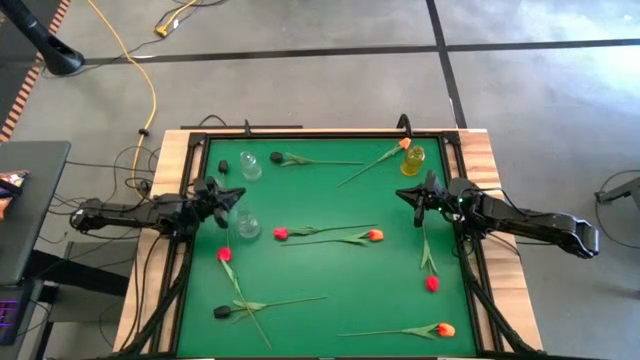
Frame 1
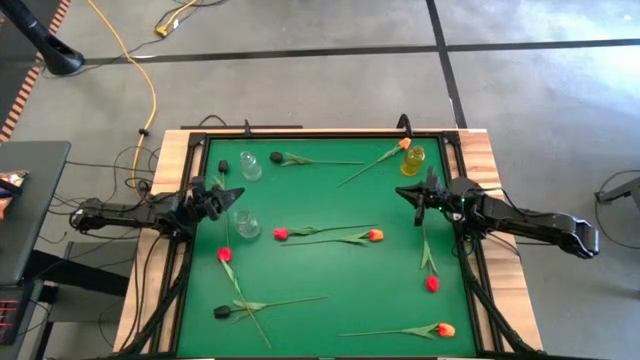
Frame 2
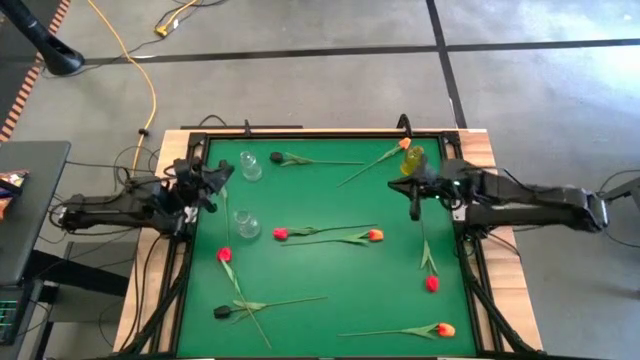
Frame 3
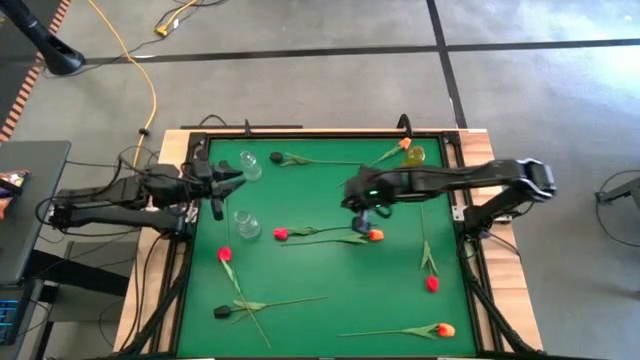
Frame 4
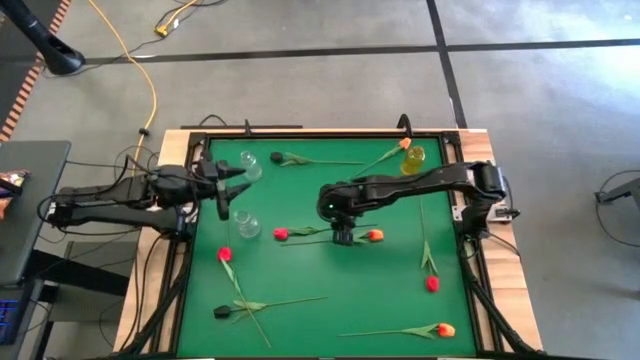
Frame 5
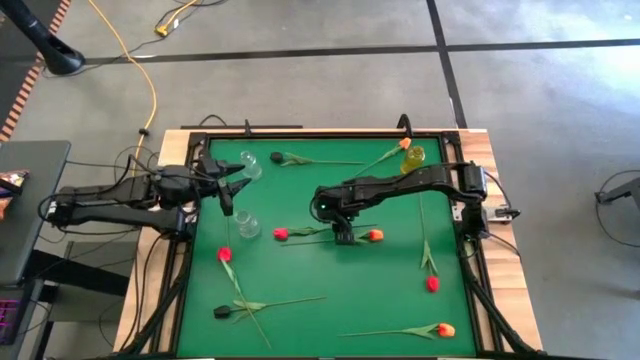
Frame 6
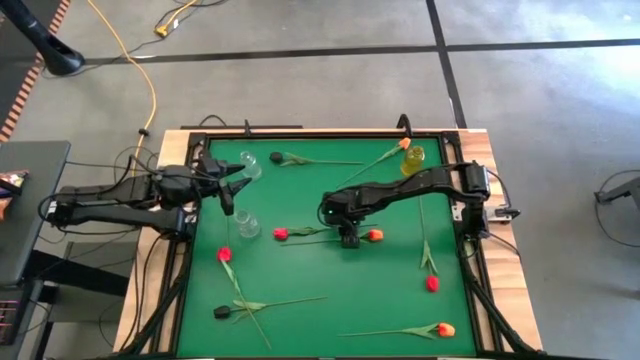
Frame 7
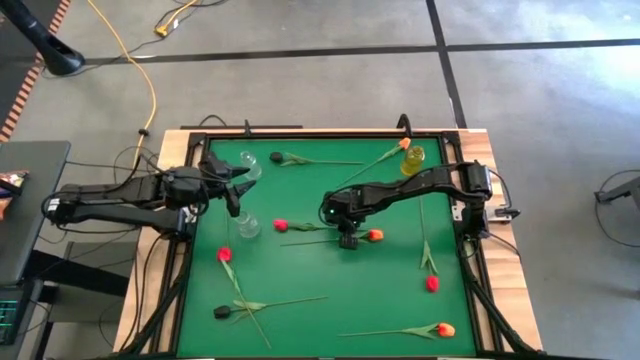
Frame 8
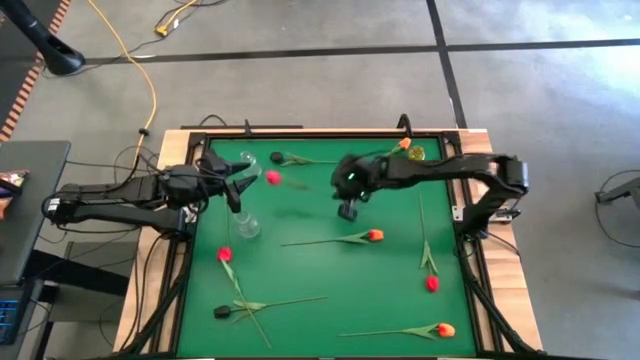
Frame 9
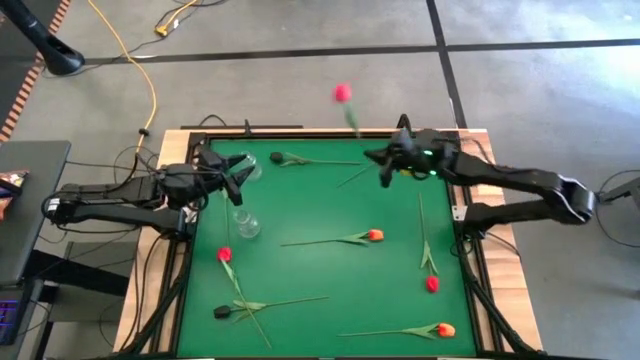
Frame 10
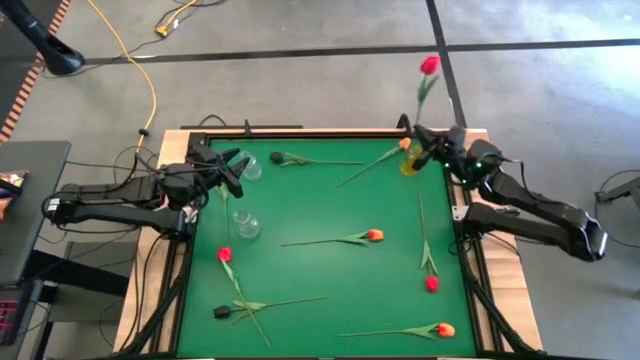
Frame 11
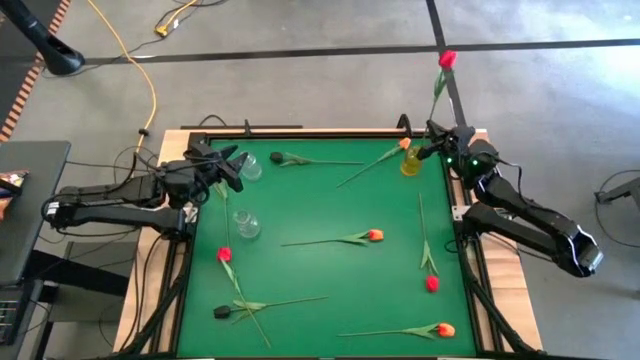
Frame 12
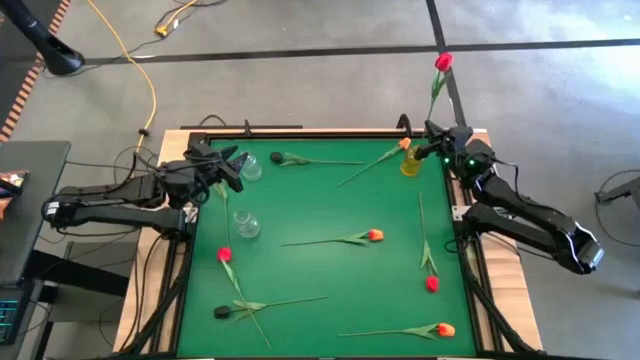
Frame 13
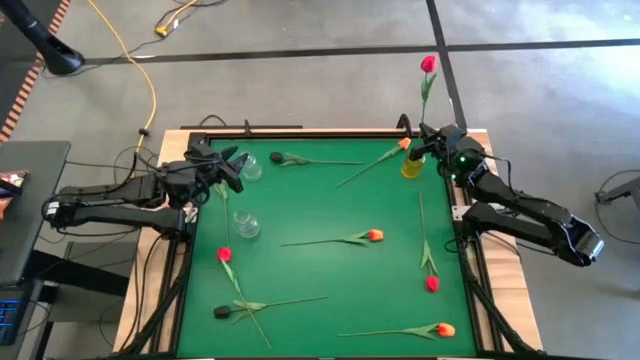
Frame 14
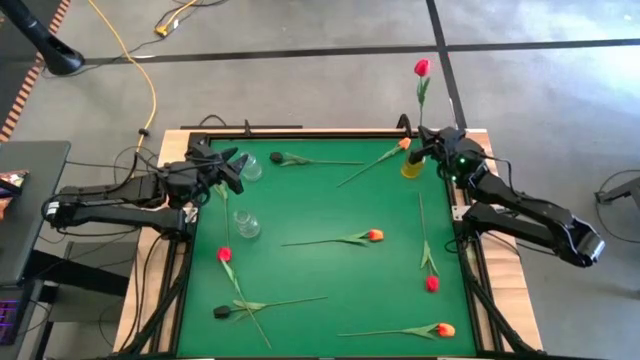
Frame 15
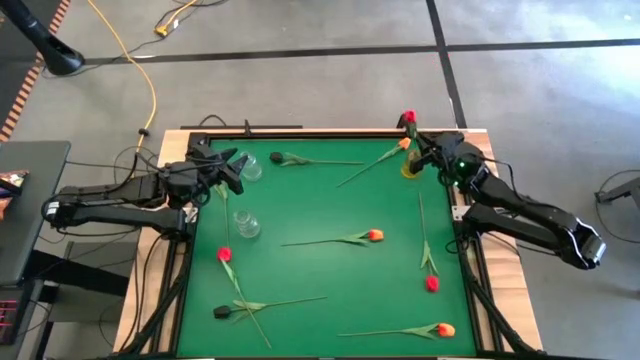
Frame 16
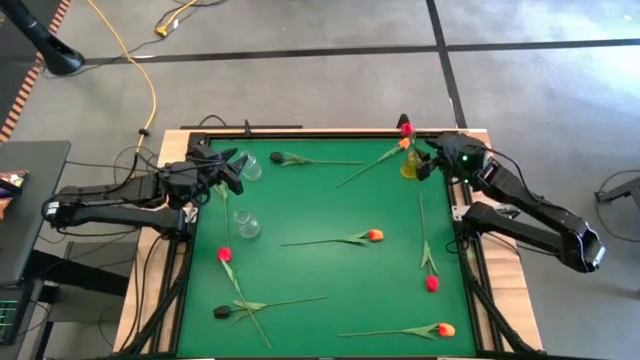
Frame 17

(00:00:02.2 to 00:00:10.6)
Task: Sort flowers into vase by color
Put the top center red flower into the yellow vase

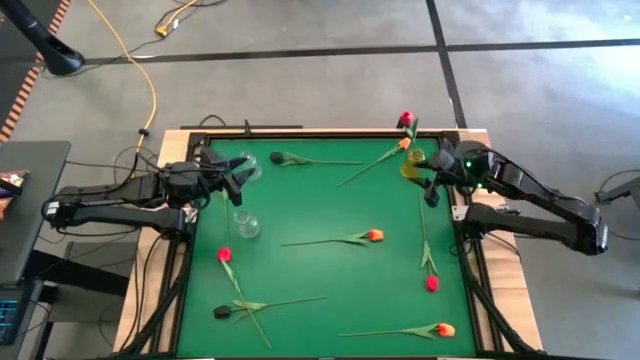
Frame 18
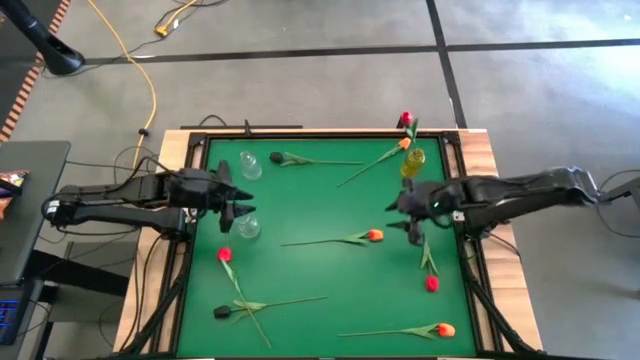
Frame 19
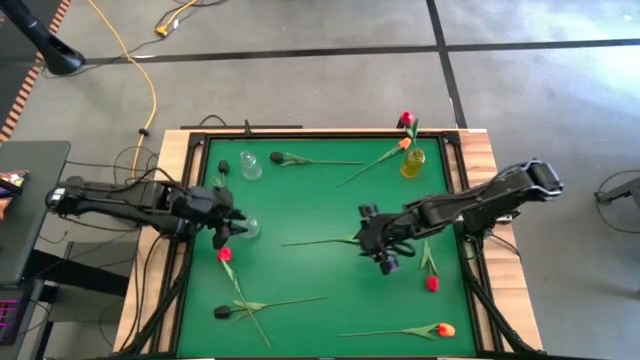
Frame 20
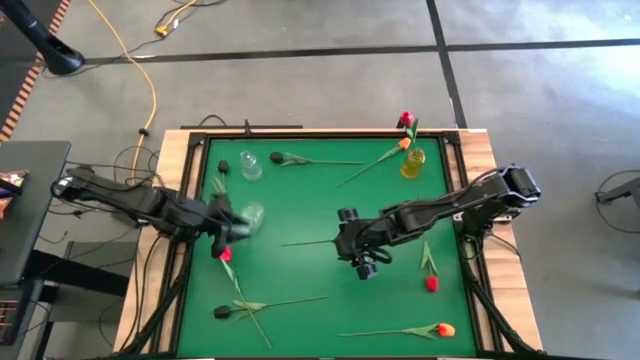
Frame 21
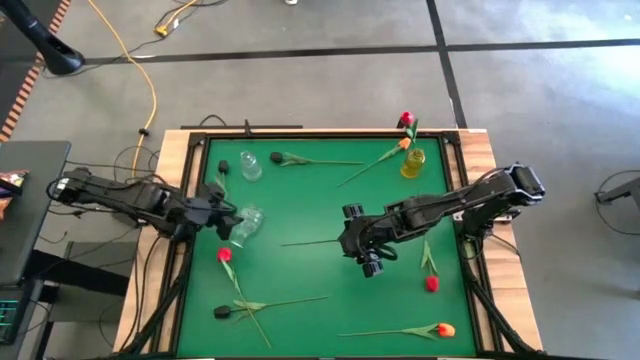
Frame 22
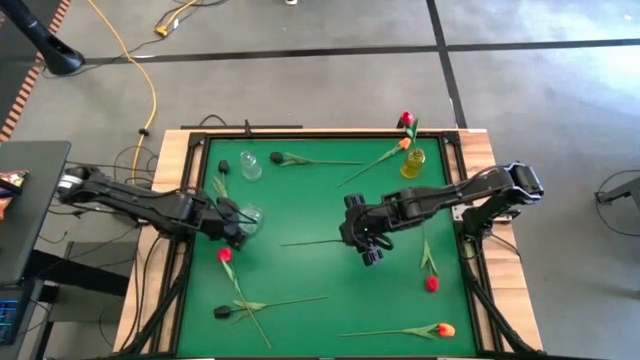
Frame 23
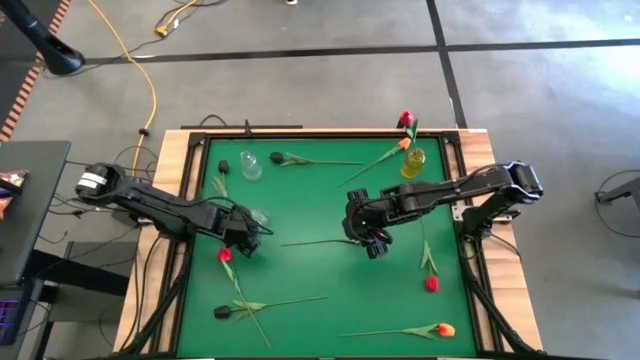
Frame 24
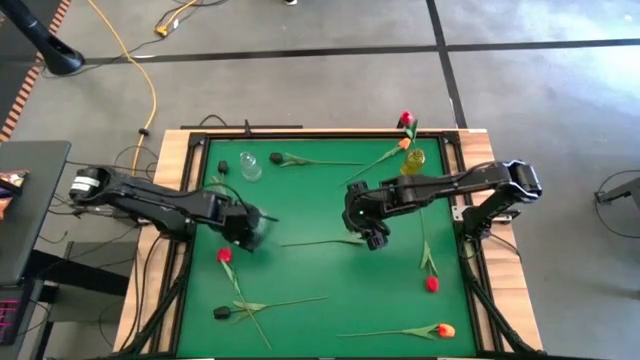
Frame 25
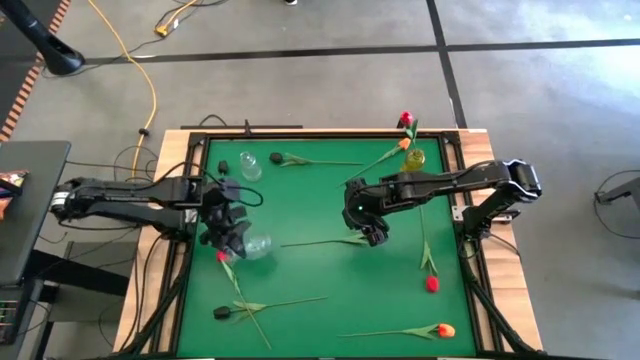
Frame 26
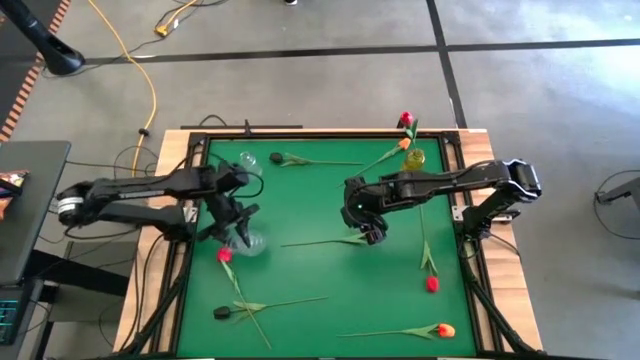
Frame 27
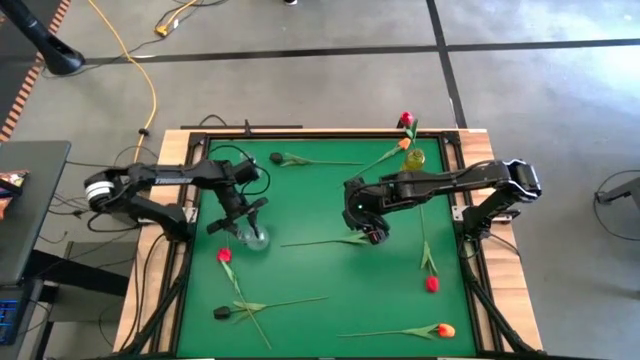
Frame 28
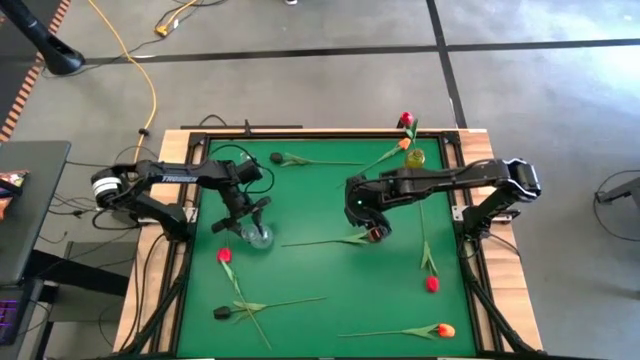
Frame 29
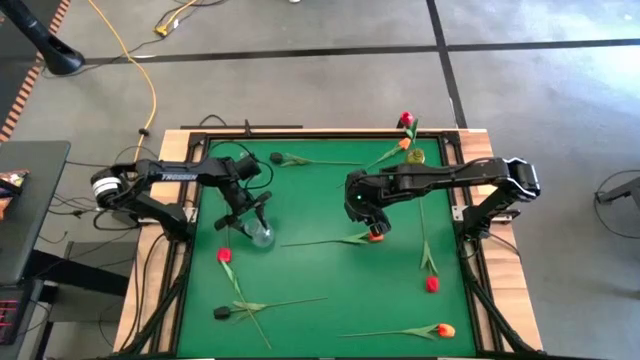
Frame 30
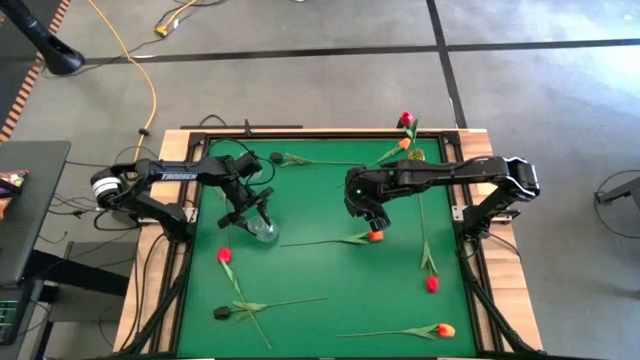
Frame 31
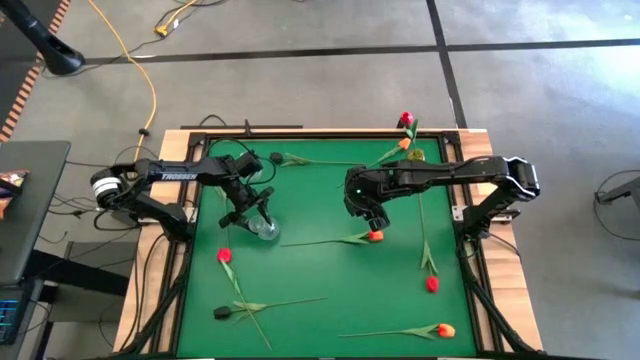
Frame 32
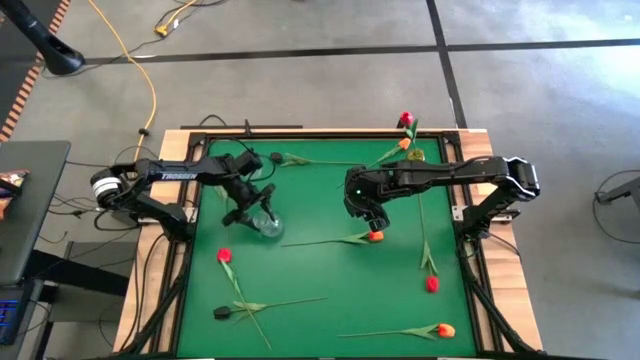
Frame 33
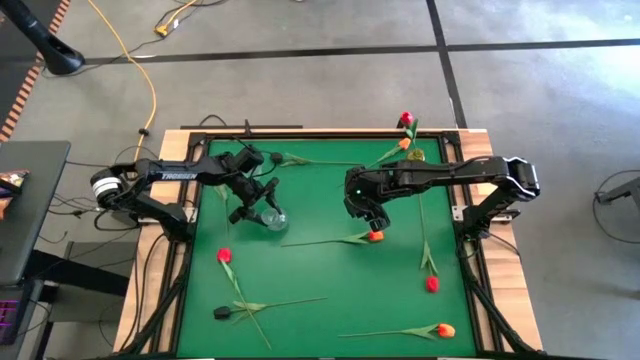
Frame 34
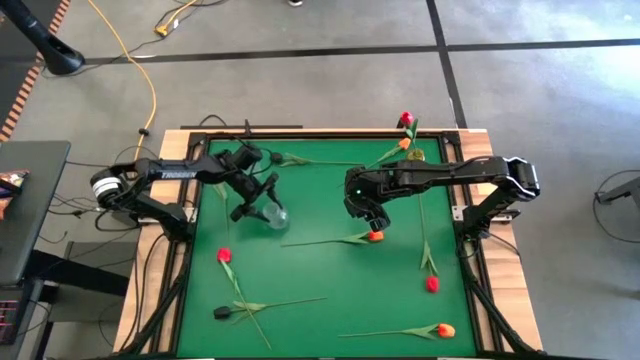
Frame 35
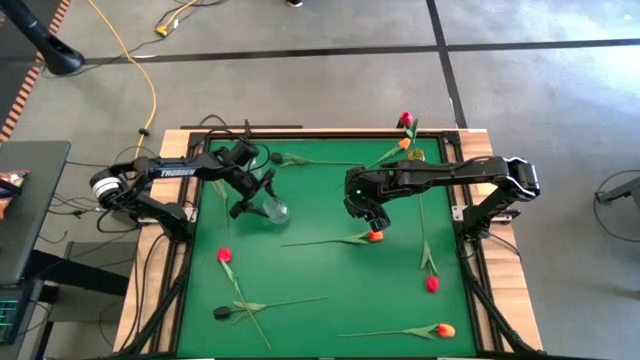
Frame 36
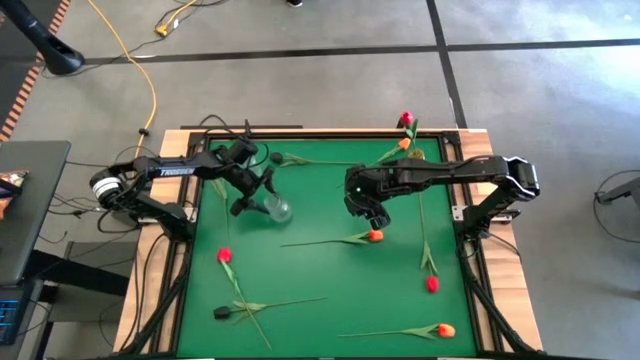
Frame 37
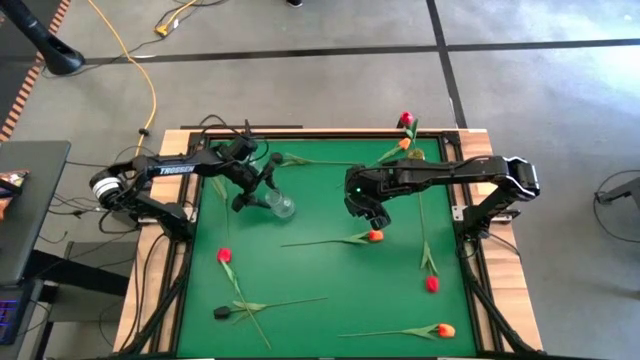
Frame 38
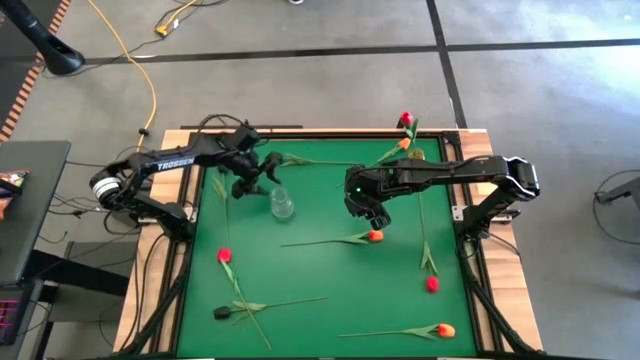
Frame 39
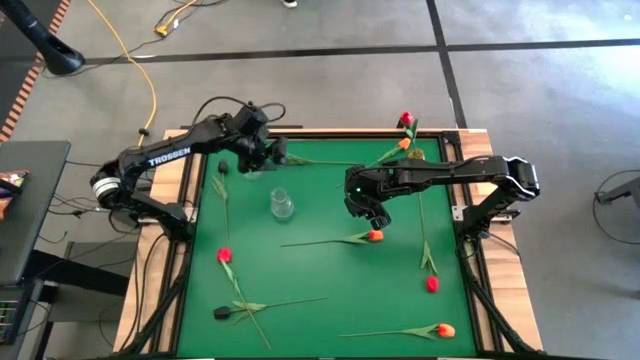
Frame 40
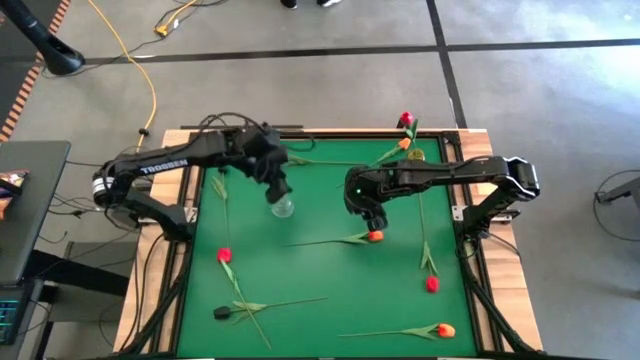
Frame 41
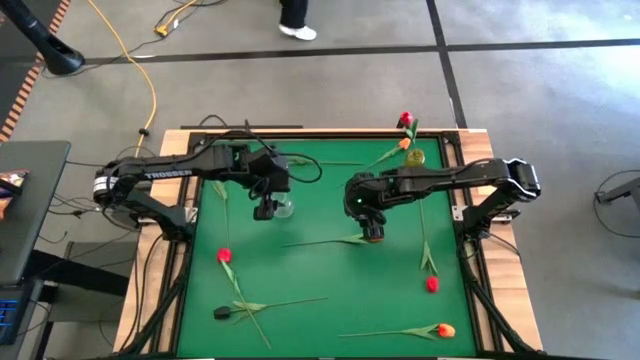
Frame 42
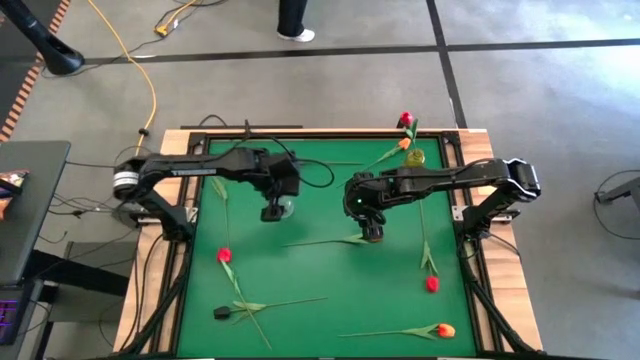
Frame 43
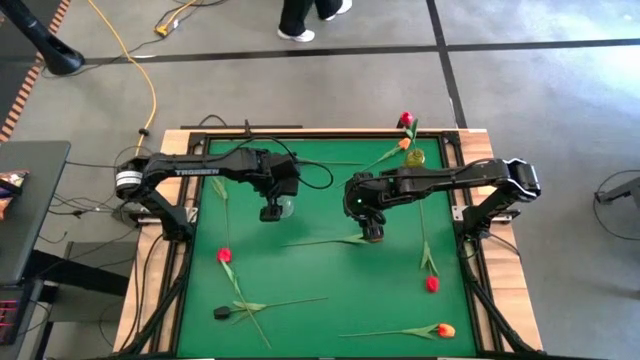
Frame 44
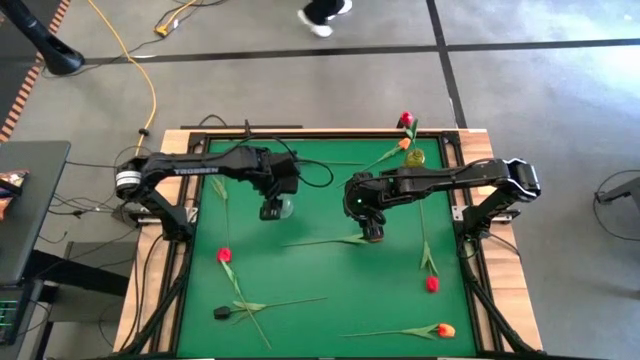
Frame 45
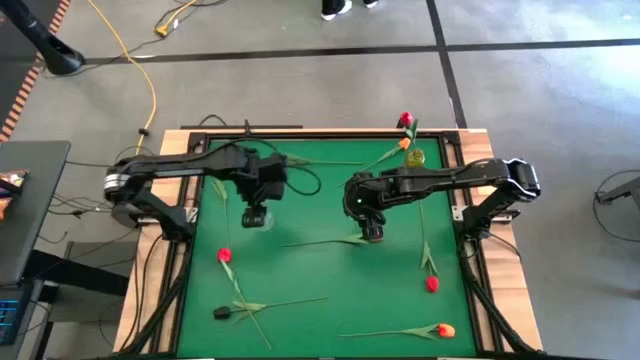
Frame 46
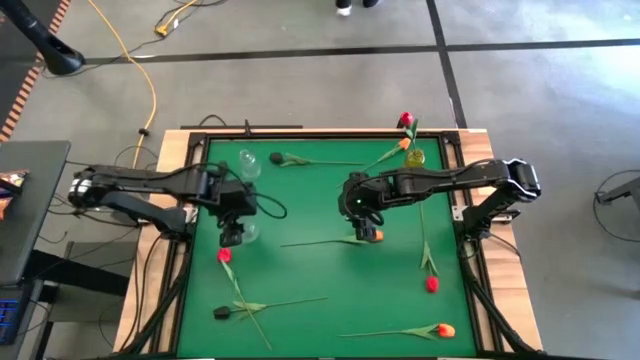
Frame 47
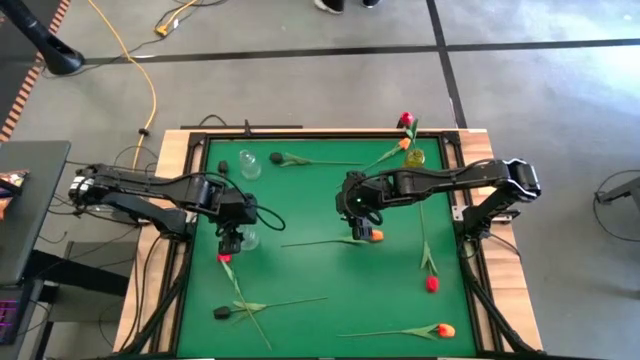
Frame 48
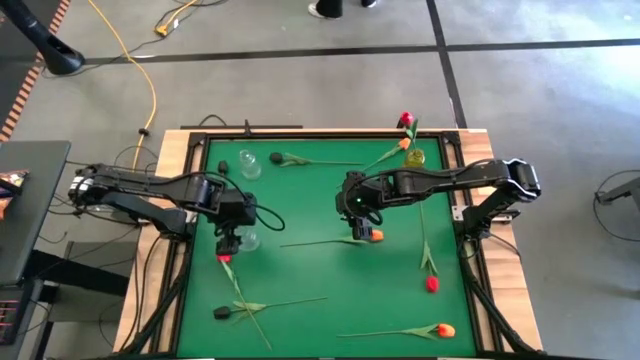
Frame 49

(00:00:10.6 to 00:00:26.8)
Move the bottom transparent vase to the middle left of the table
